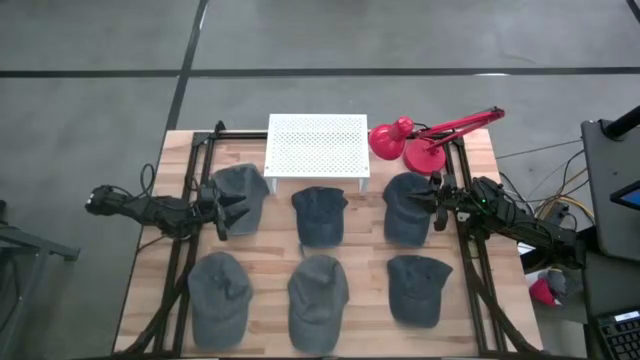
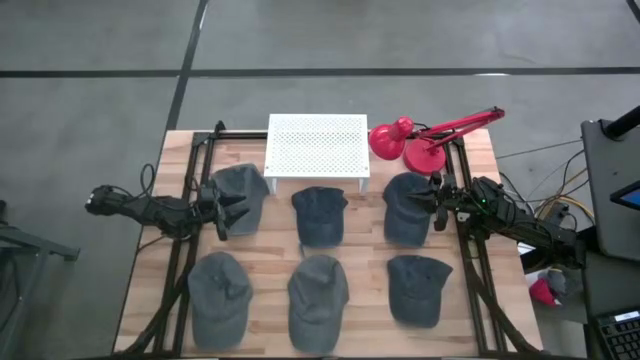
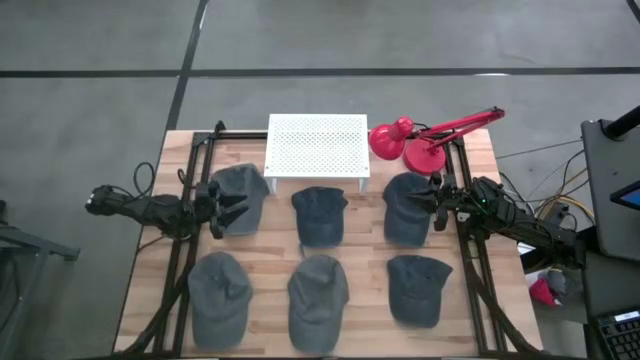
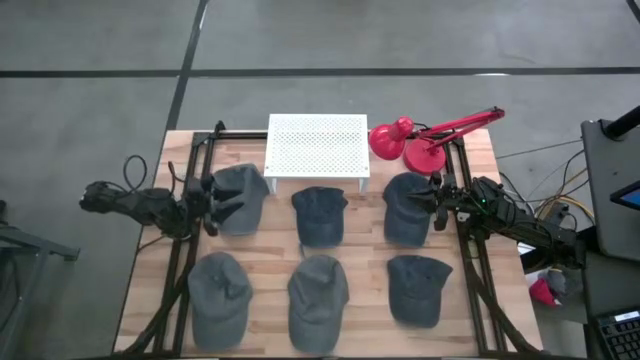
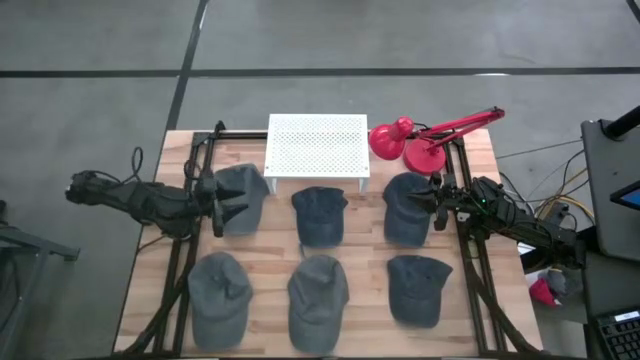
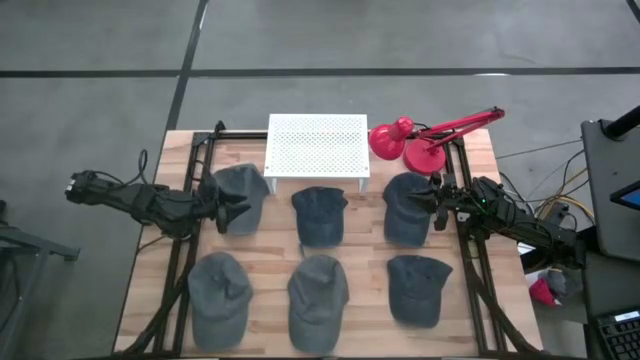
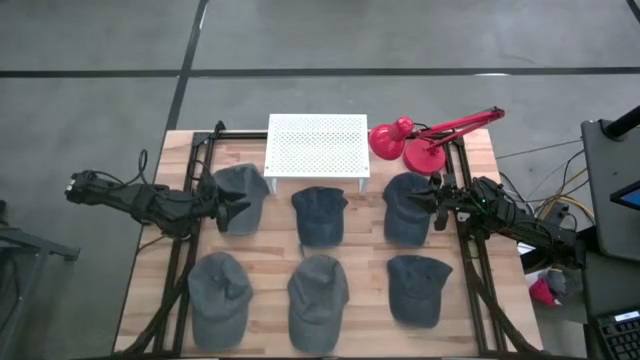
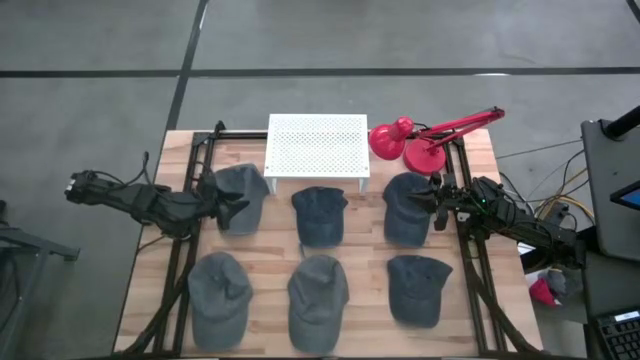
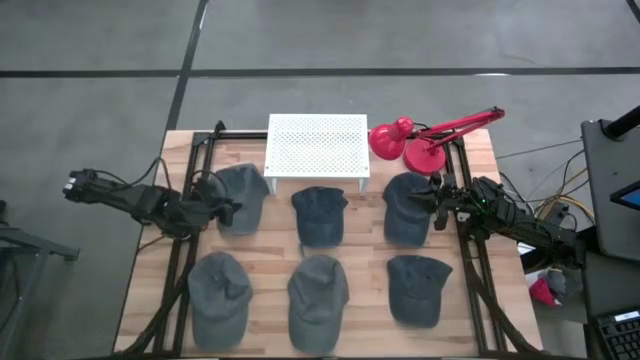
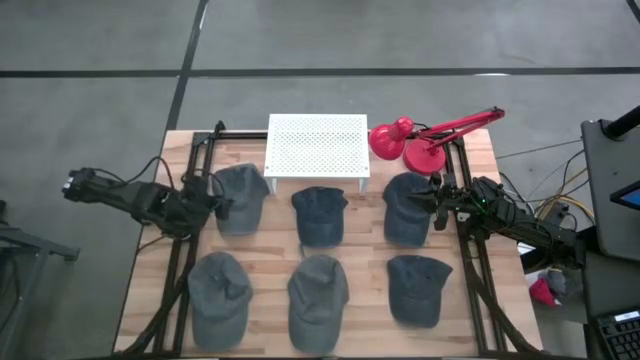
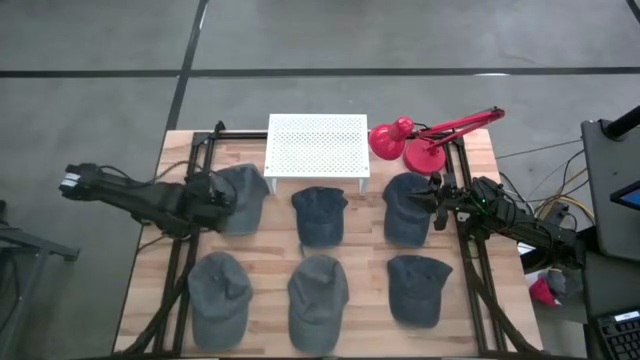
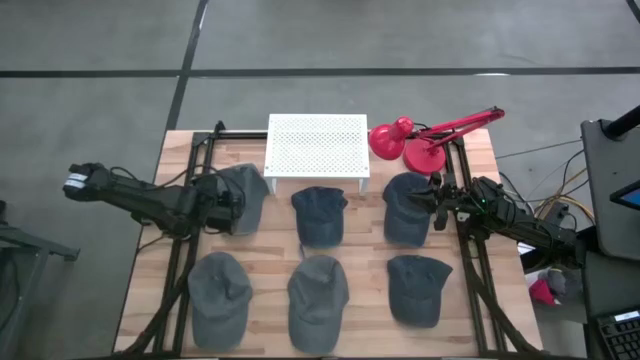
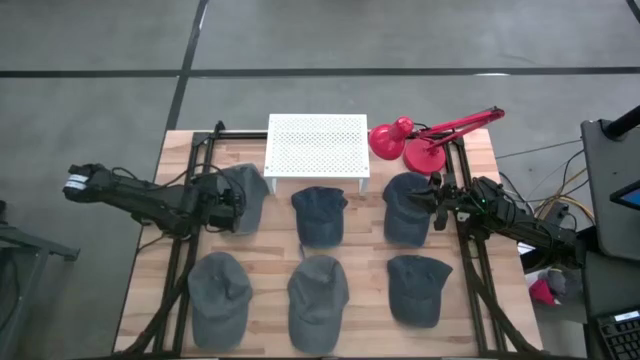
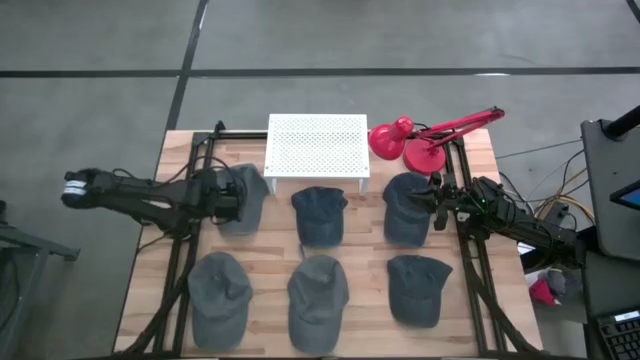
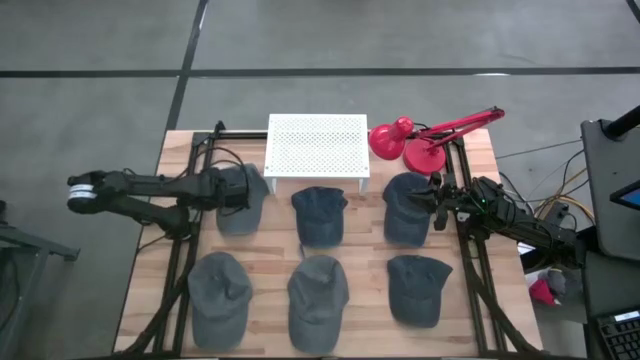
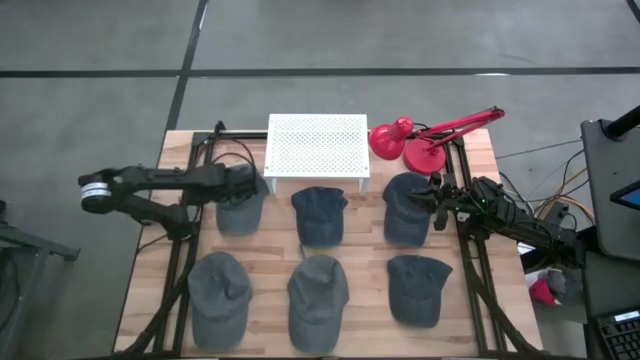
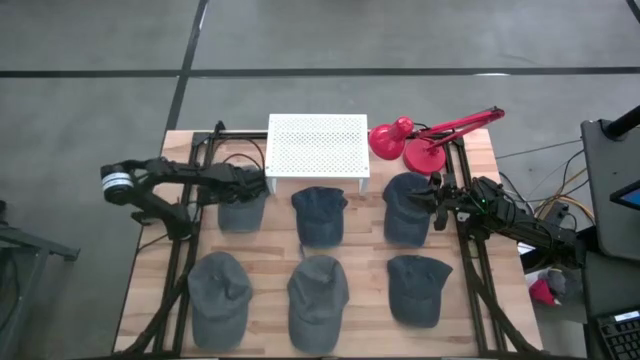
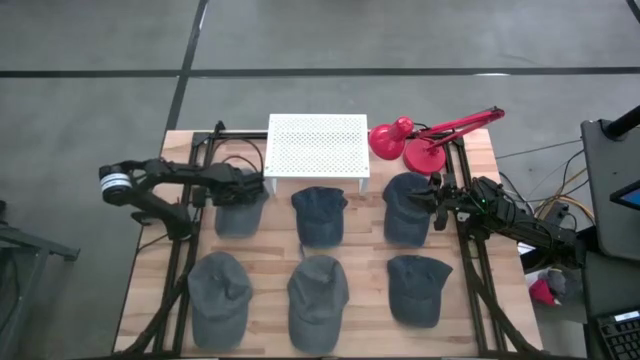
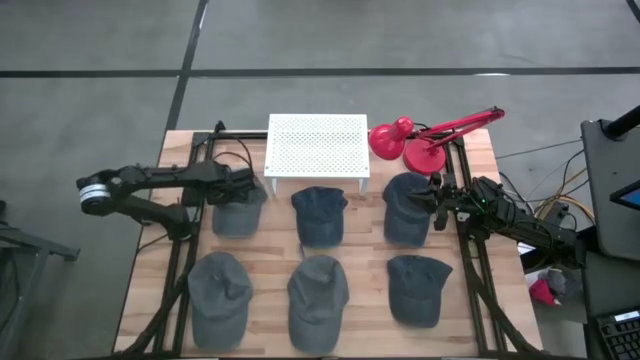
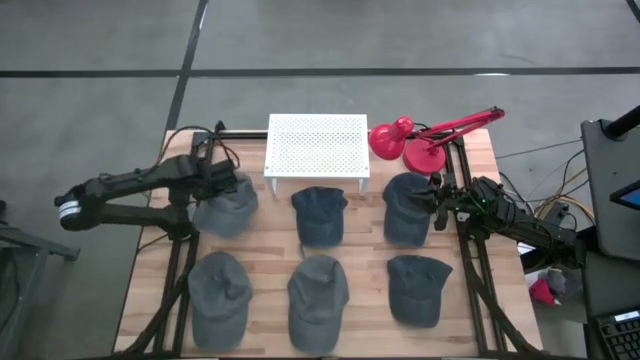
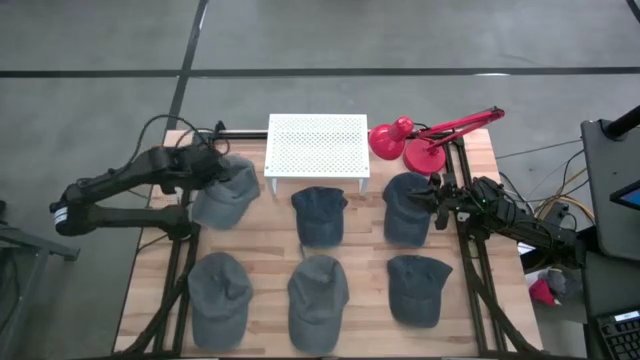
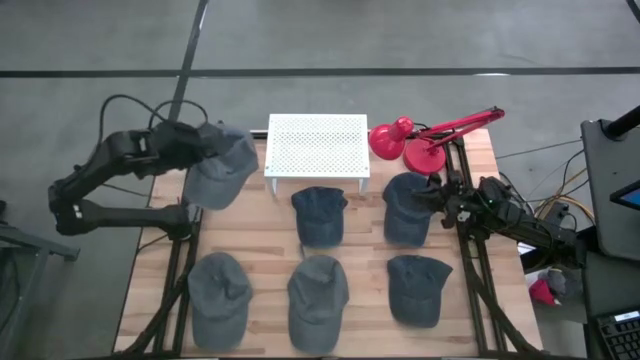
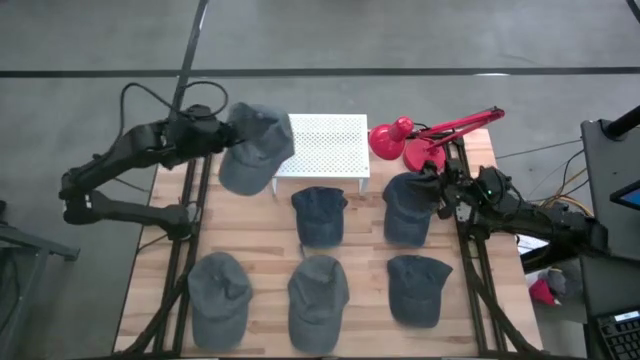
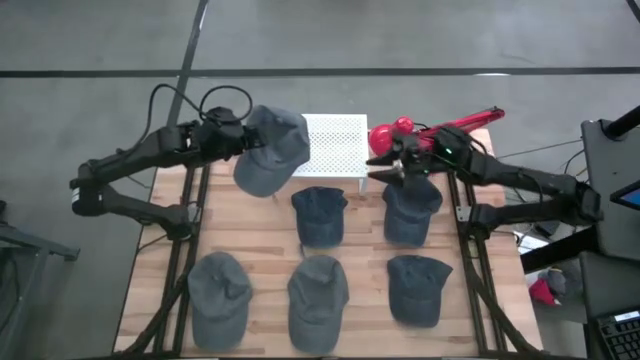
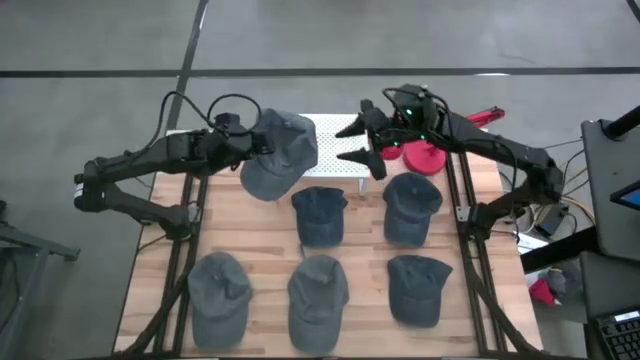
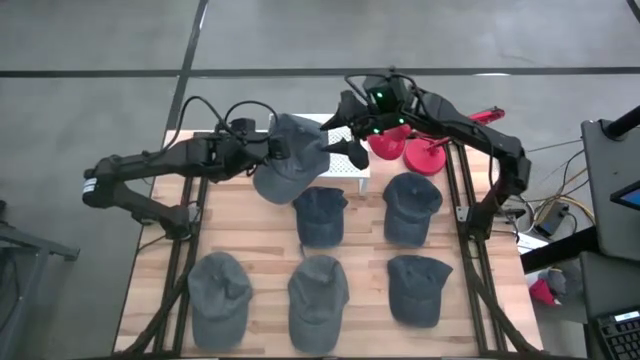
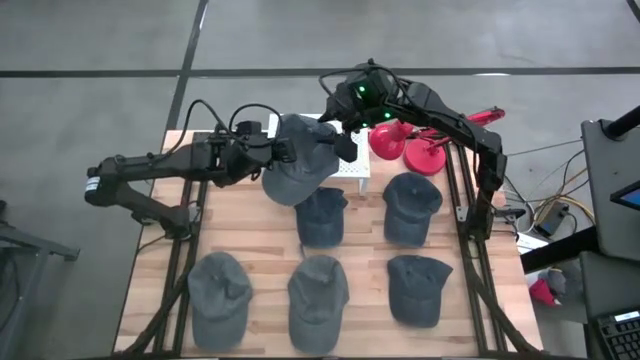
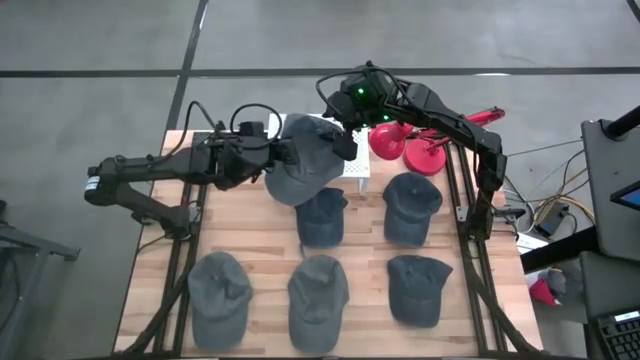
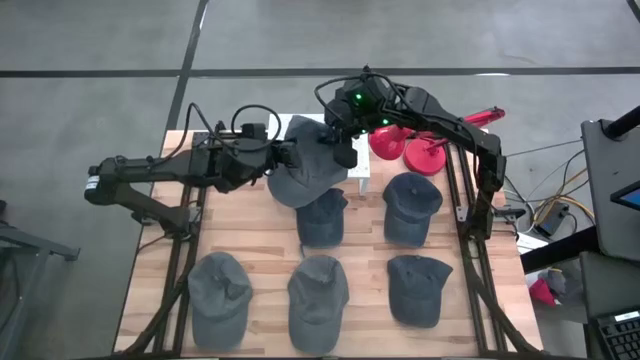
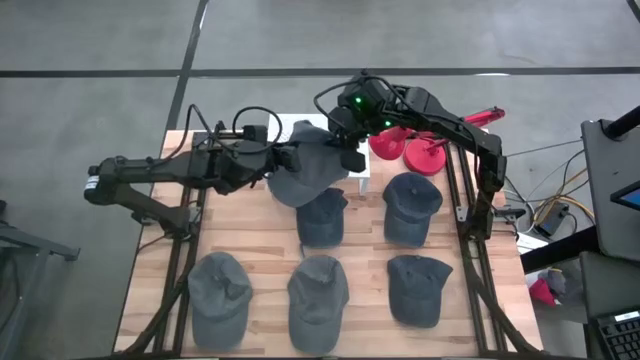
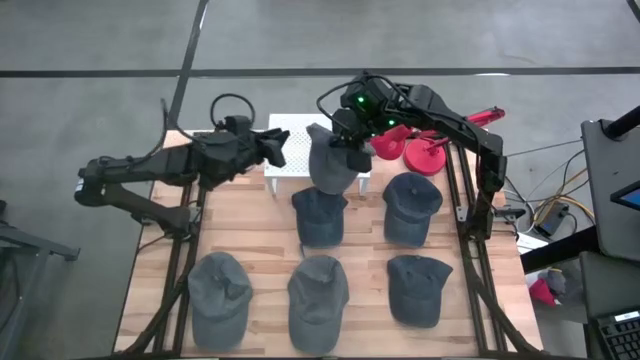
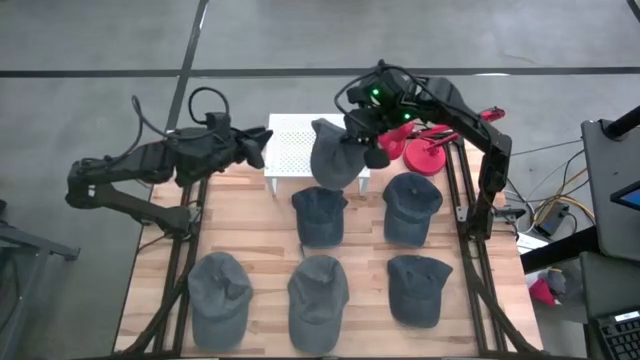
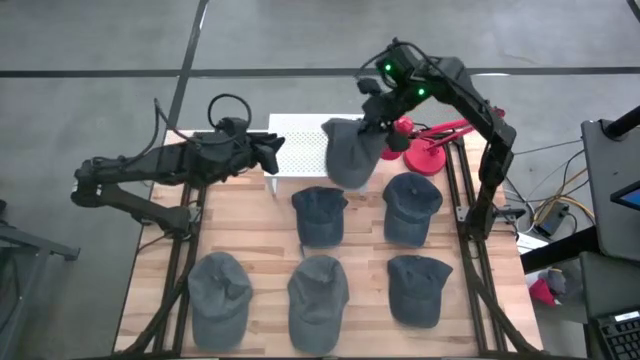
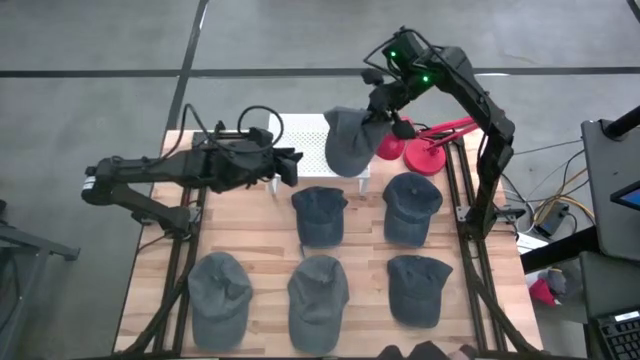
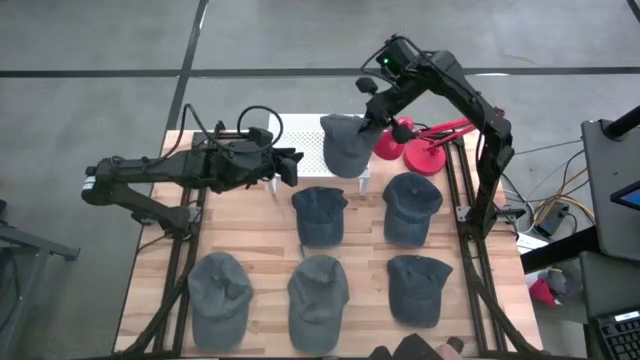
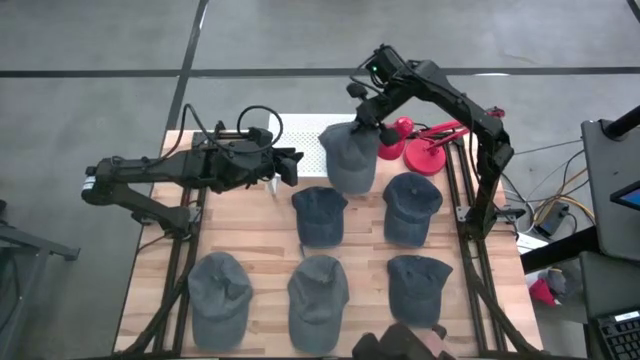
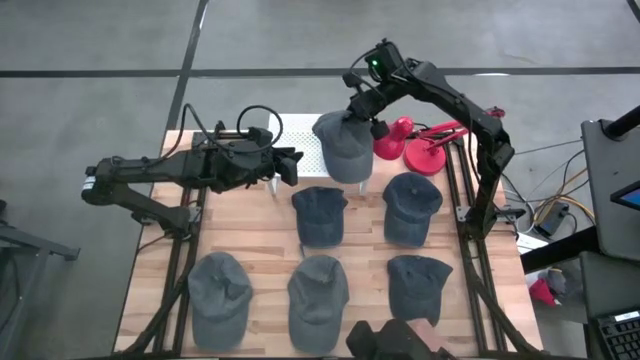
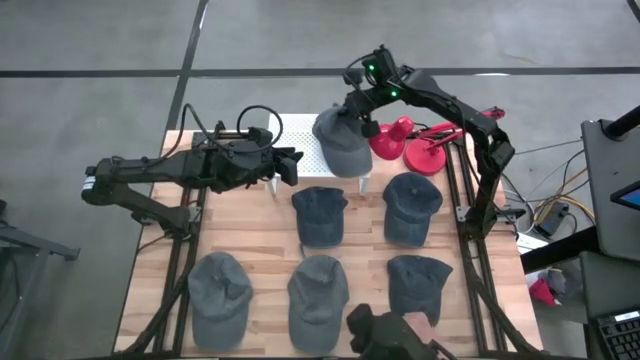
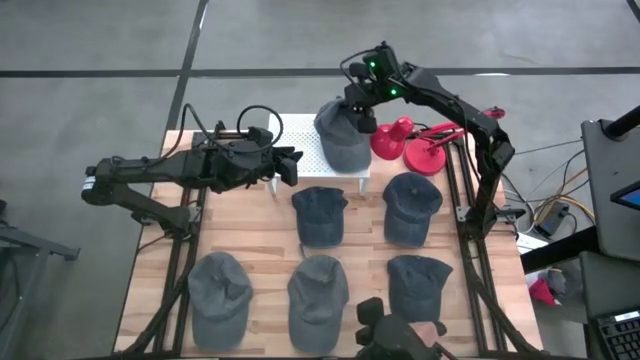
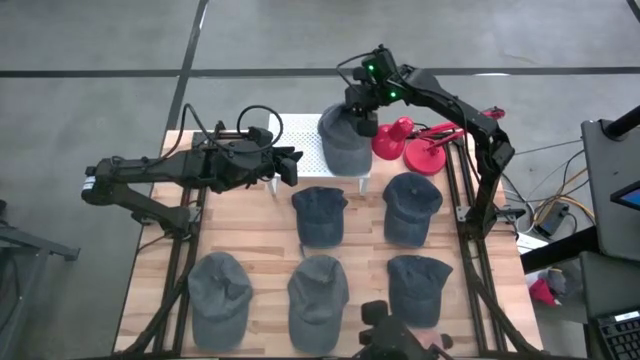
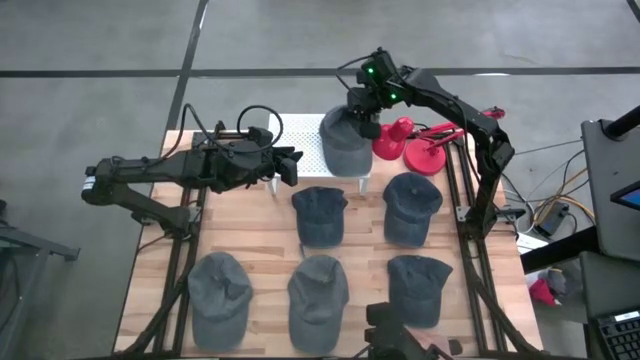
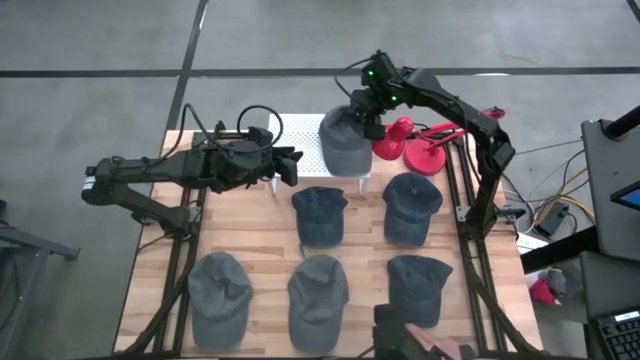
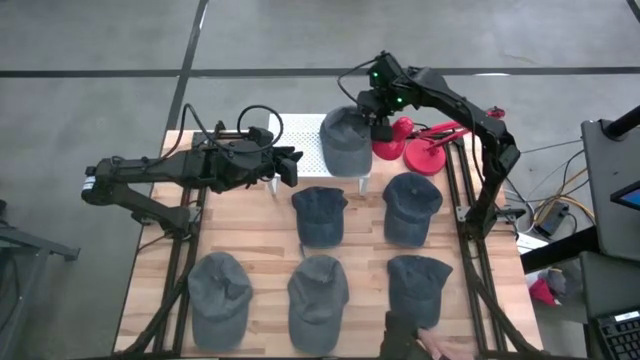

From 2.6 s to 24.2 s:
Task: Pick & Place hat
Put the top left gray cap on the shelf
